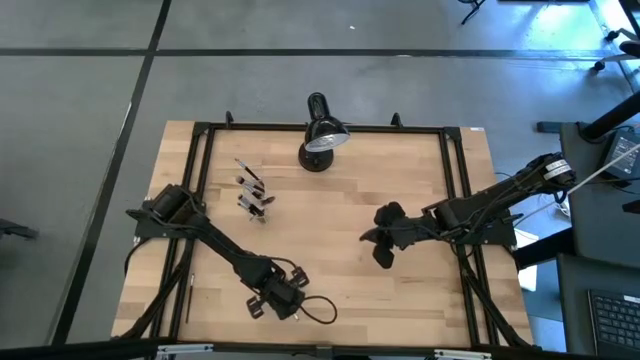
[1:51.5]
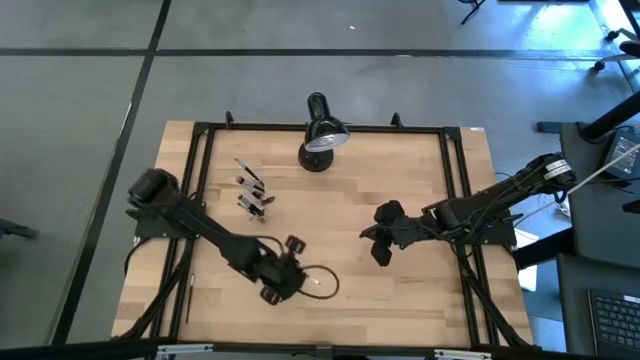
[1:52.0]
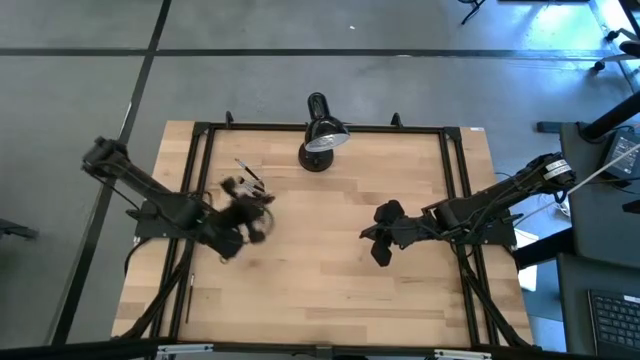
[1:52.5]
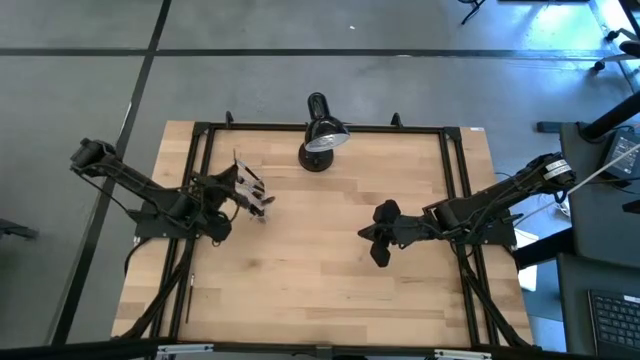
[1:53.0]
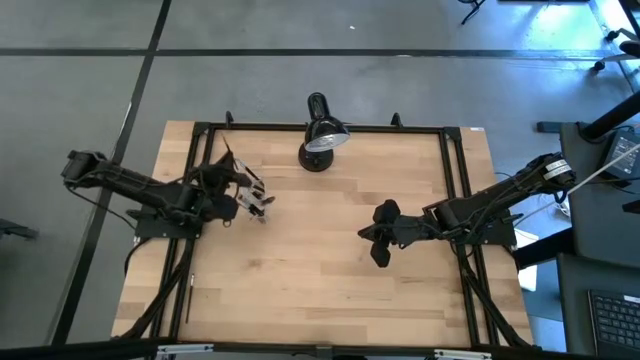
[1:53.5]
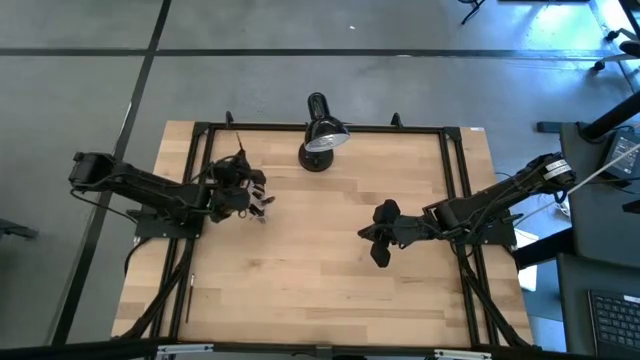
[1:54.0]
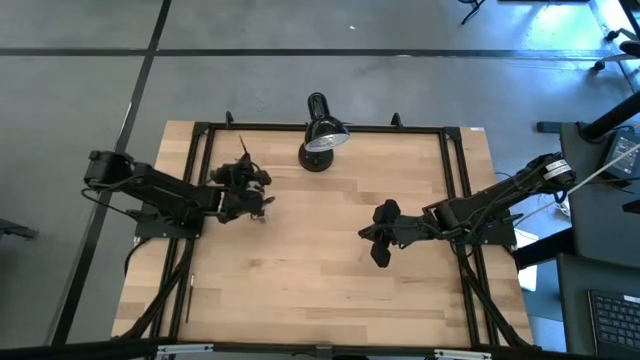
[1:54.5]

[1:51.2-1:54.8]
Task: Sort items
Put the eyeshadow brush into the transparent organizer

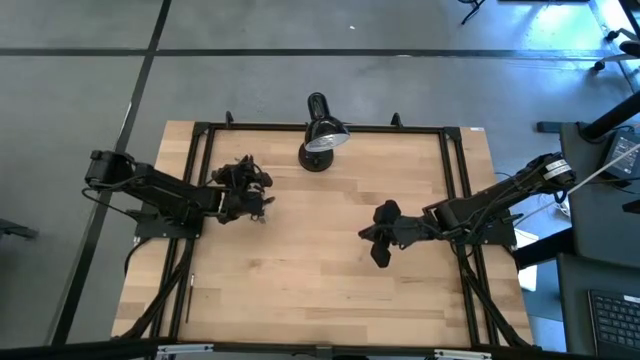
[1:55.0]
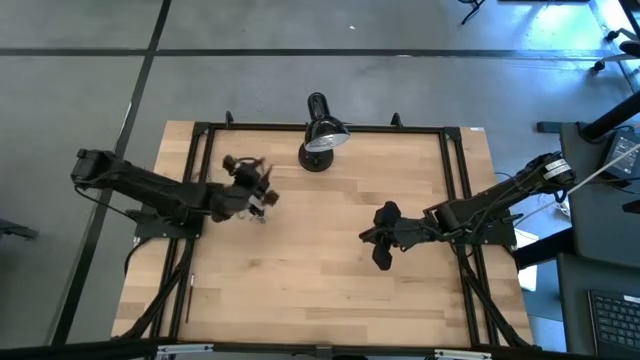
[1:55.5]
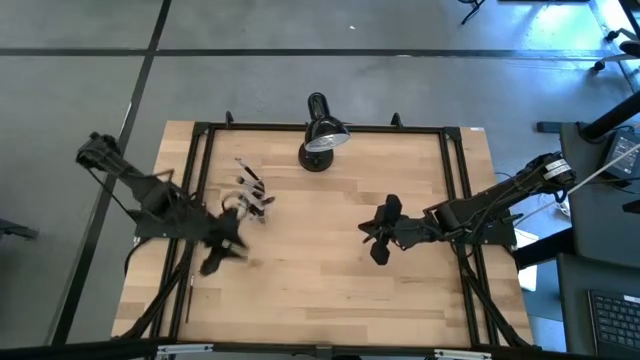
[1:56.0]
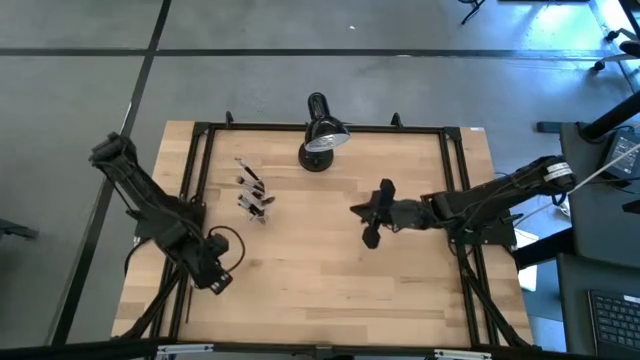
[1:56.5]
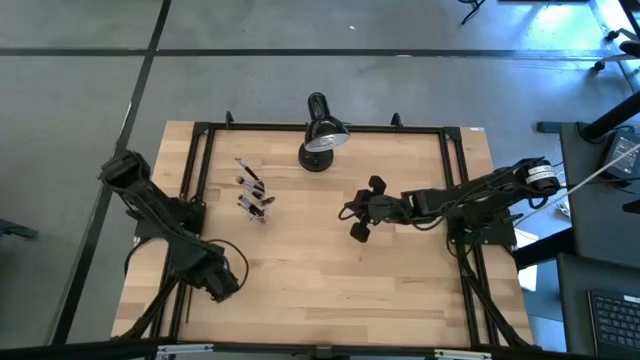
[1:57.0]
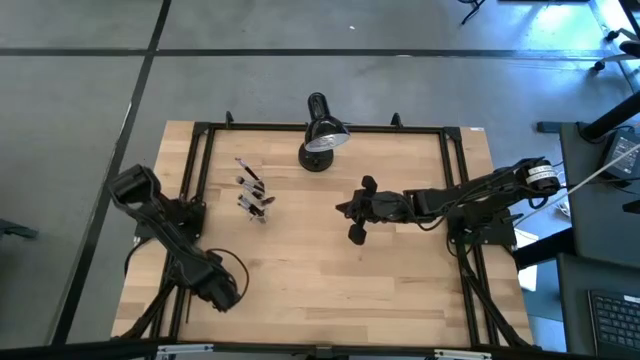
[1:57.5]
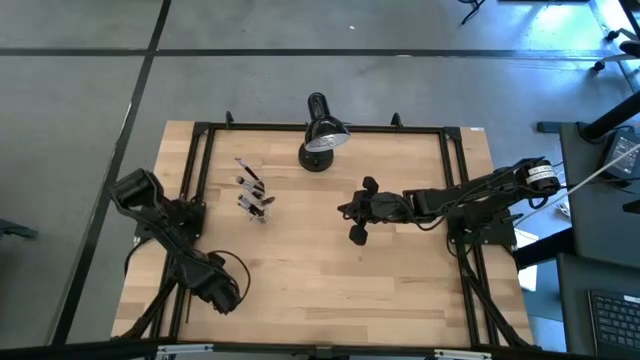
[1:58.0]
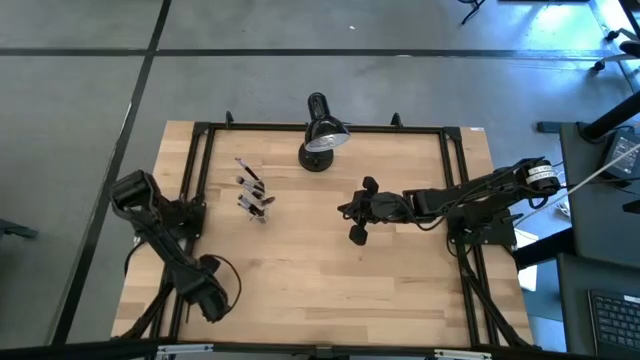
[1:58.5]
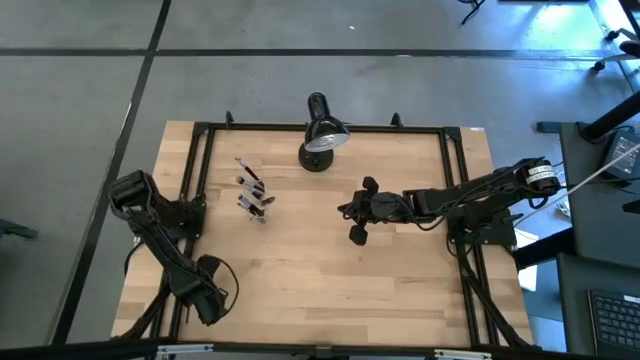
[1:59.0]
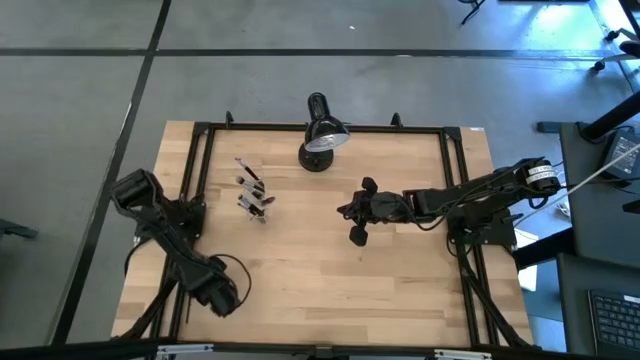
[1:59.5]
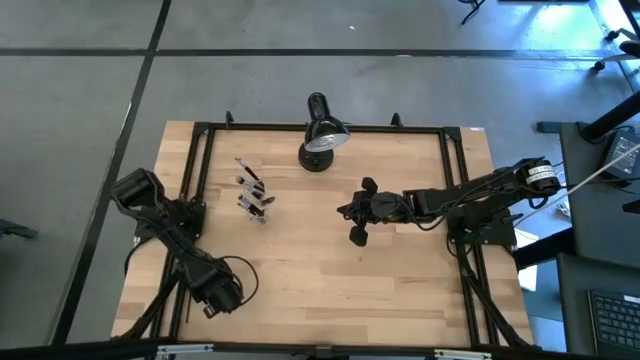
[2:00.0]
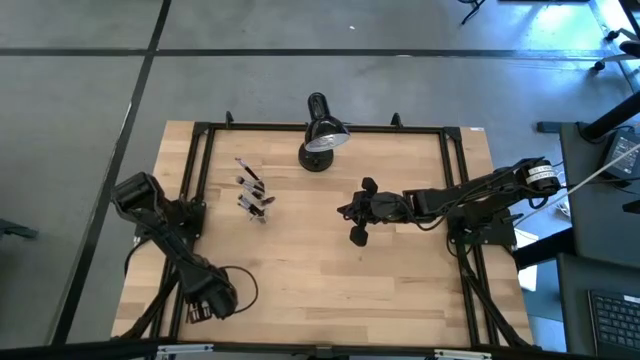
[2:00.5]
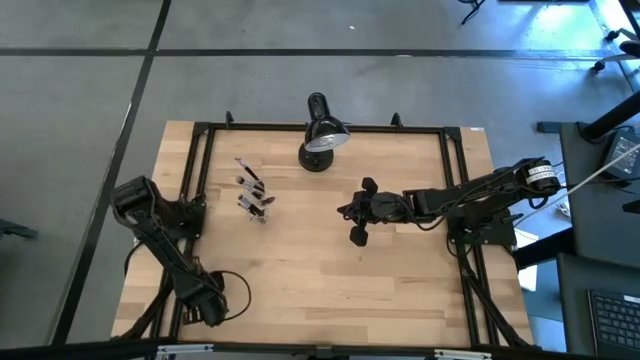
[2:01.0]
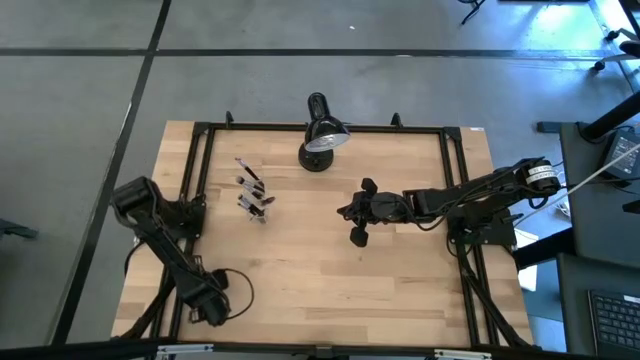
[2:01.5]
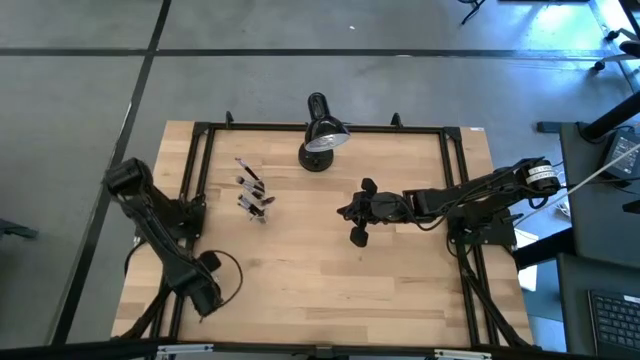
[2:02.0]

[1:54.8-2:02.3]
Adjust the eyeshadow to the right side

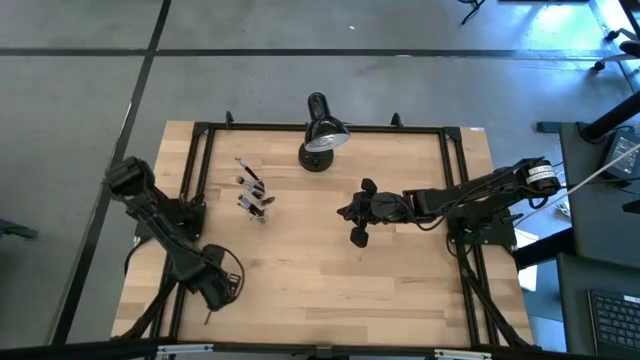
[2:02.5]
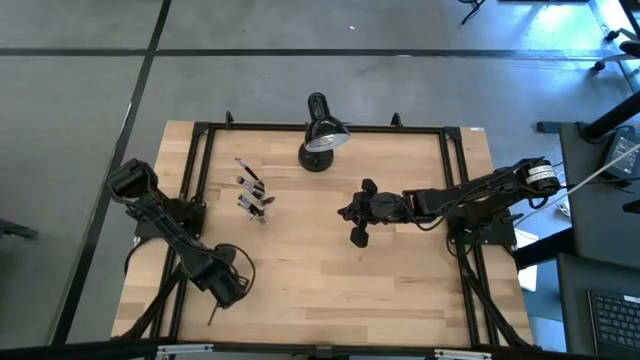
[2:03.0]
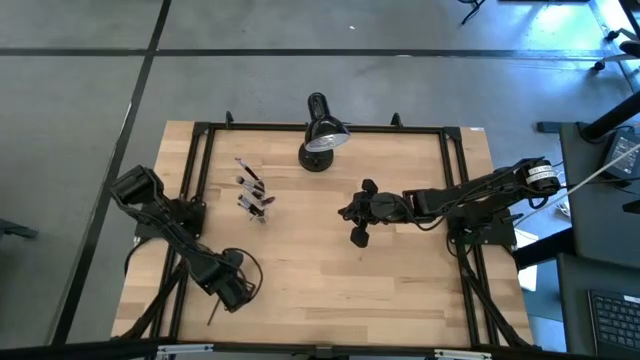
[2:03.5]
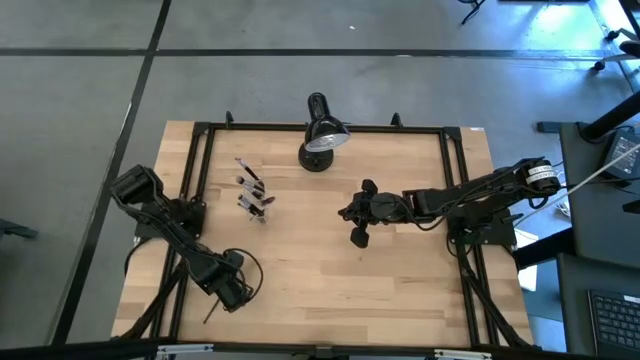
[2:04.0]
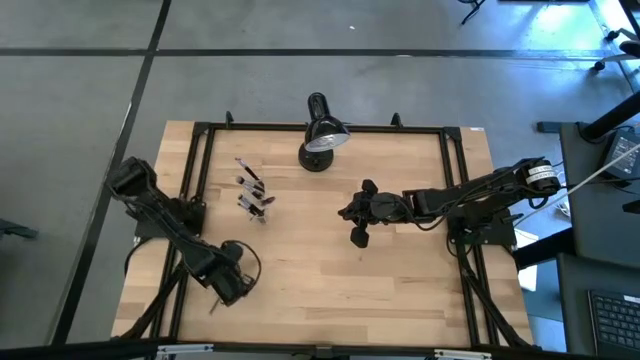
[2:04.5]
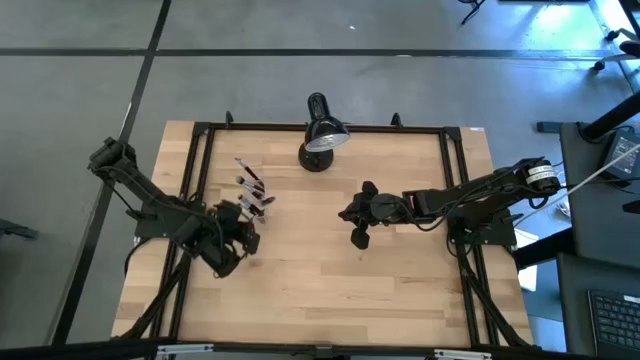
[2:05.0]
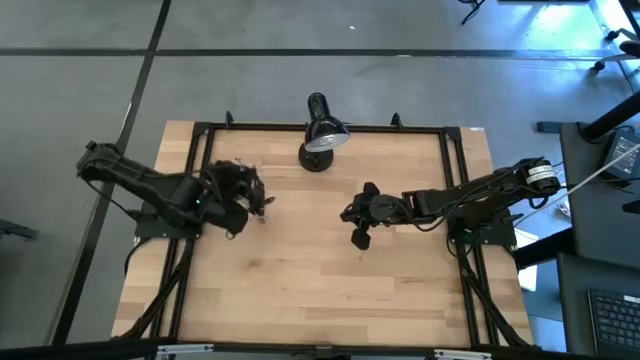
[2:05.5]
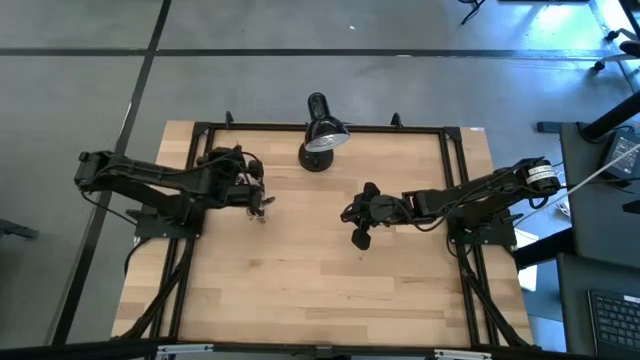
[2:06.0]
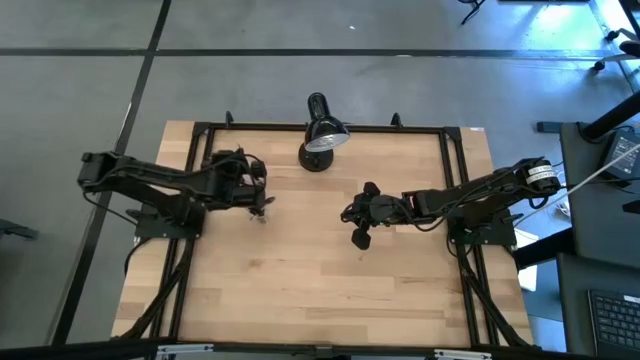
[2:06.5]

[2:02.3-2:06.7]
Put the eyeshadow brush into the transparent organizer

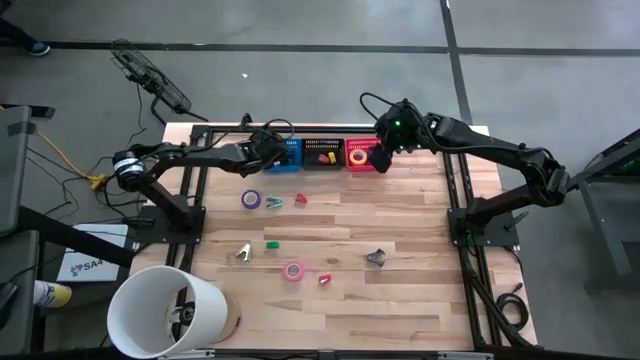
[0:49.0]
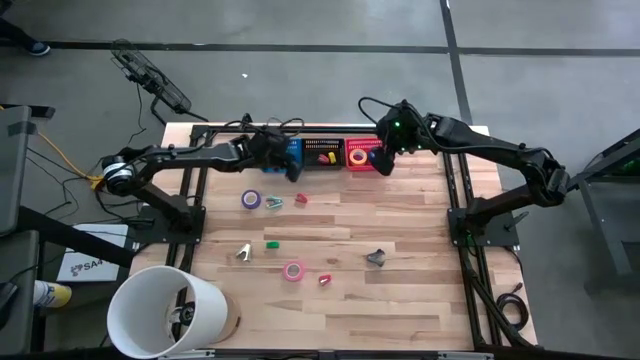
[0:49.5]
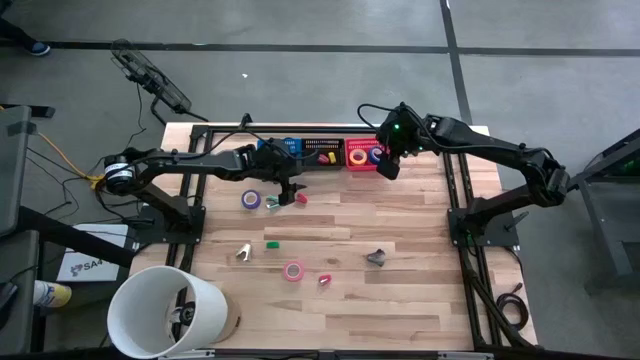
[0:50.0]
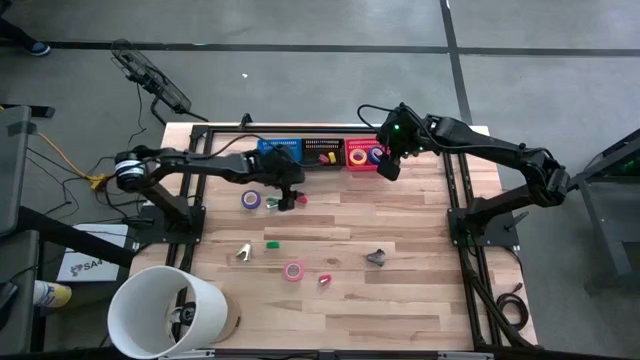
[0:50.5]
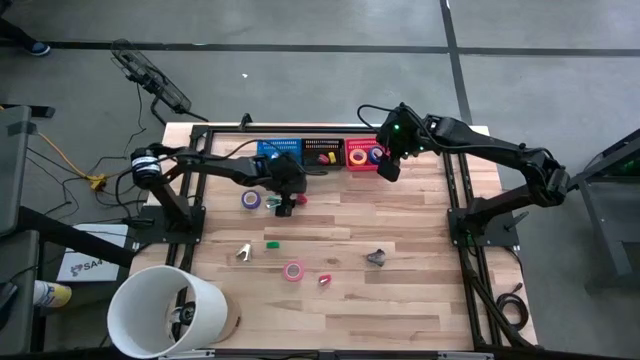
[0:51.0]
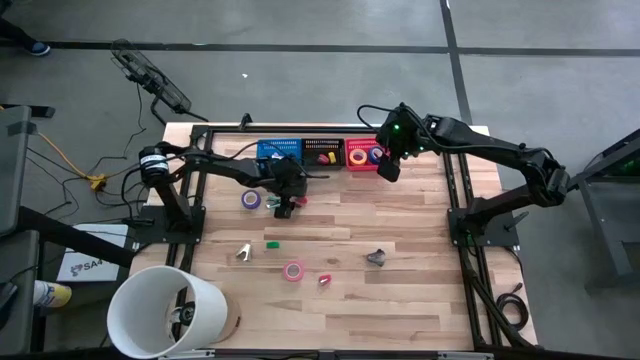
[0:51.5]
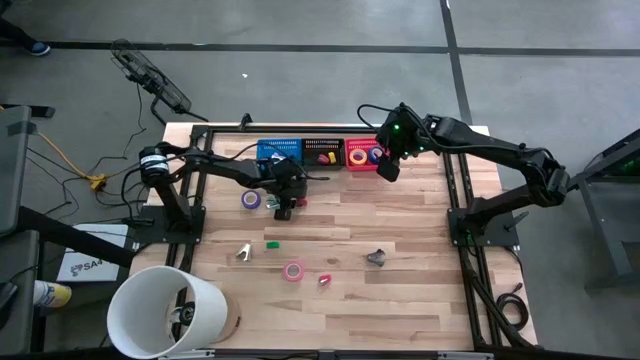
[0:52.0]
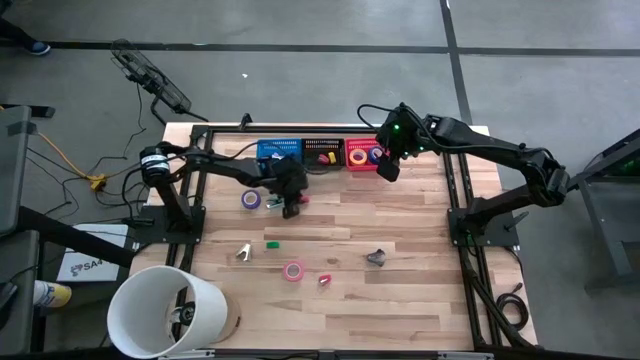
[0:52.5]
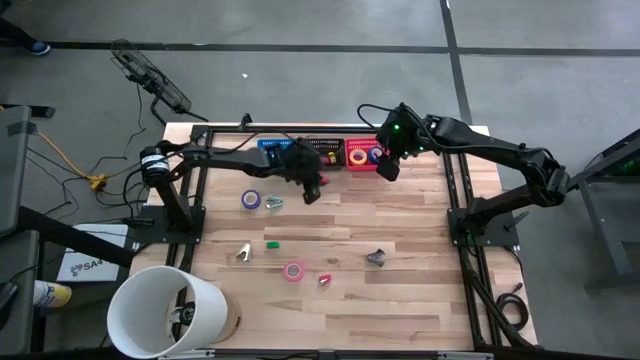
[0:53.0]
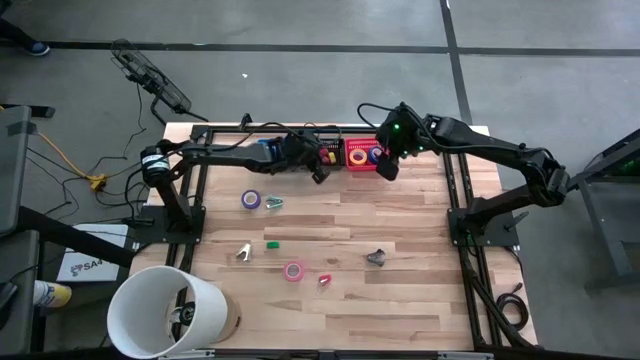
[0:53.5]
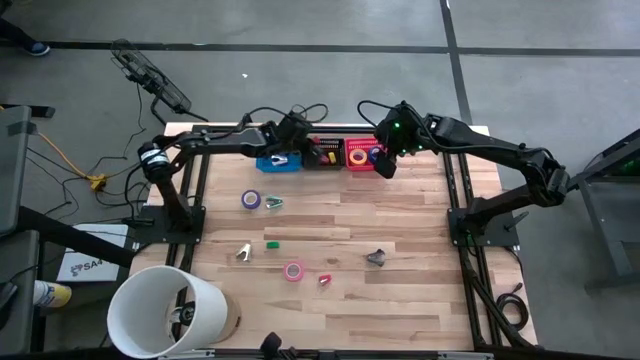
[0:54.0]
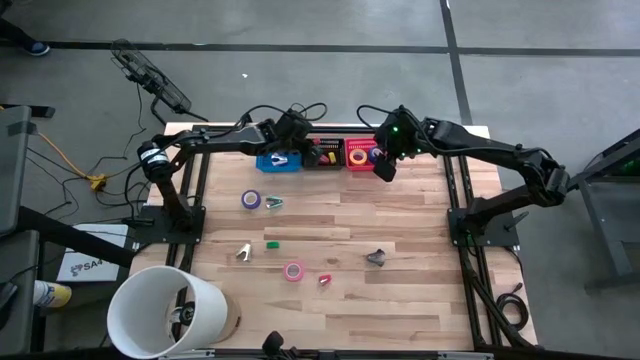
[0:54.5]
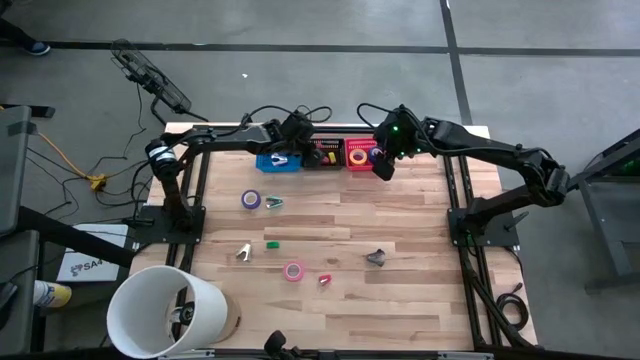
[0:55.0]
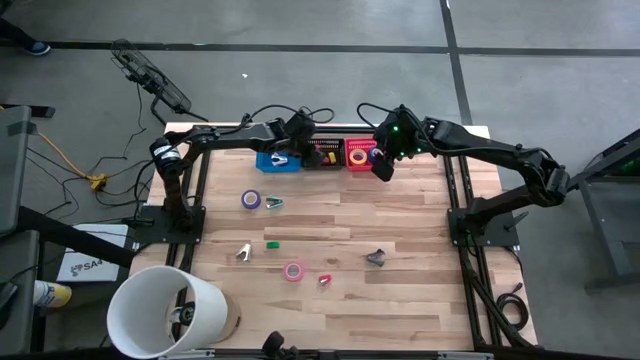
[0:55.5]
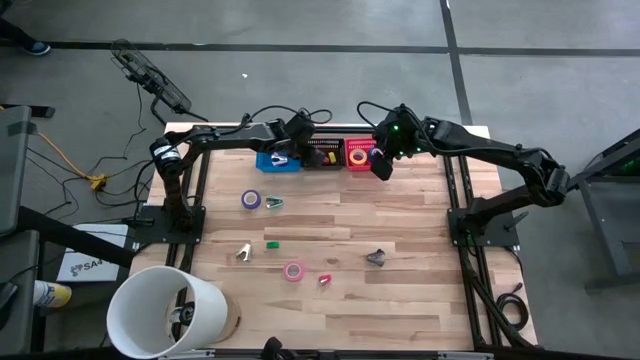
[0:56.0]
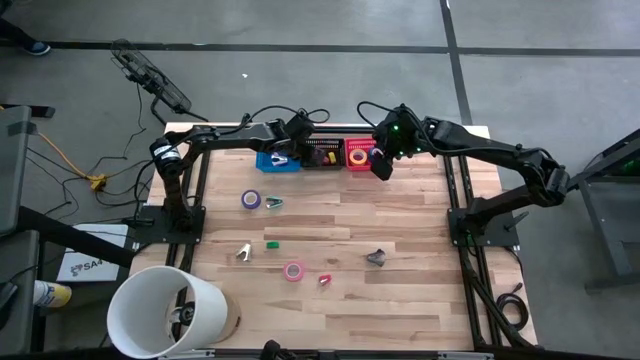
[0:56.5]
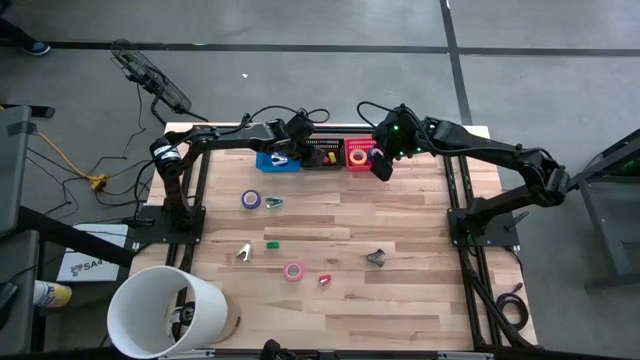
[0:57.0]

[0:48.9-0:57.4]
Task: Pick and place Stapler, Stapler remover, tape
Put the top red stapler into the black bin
